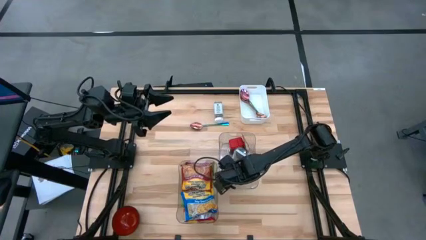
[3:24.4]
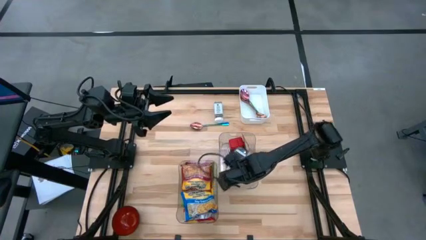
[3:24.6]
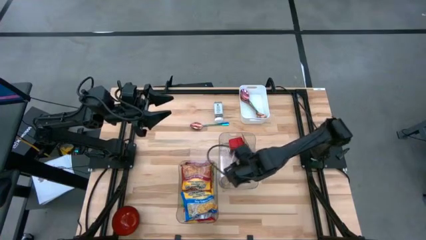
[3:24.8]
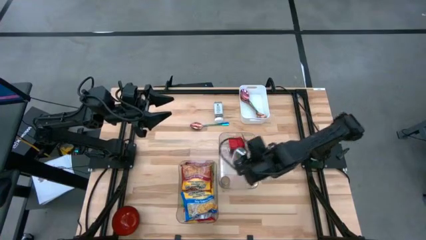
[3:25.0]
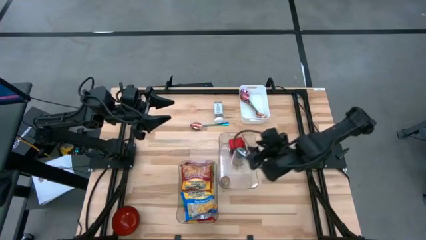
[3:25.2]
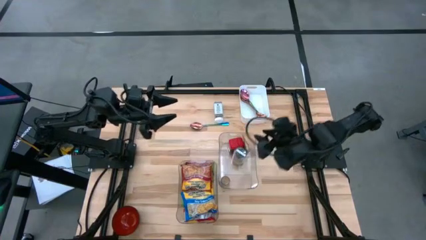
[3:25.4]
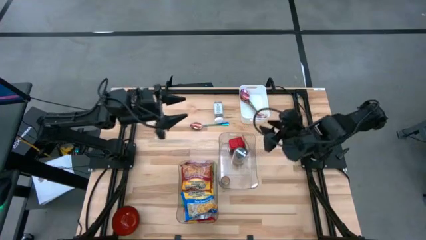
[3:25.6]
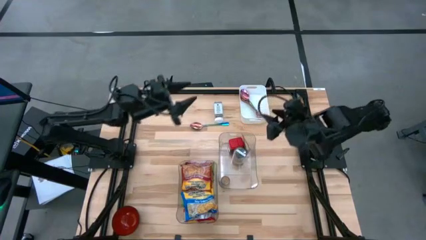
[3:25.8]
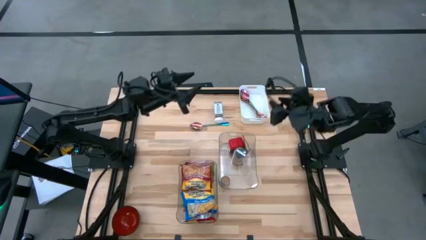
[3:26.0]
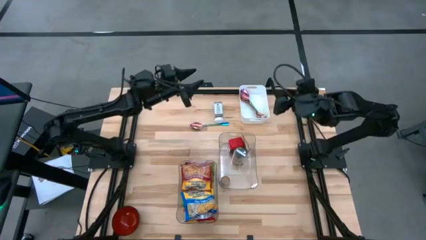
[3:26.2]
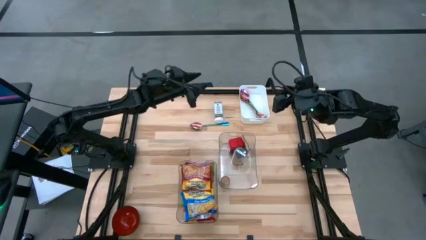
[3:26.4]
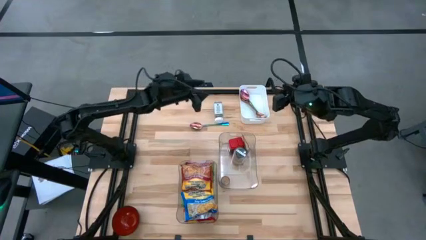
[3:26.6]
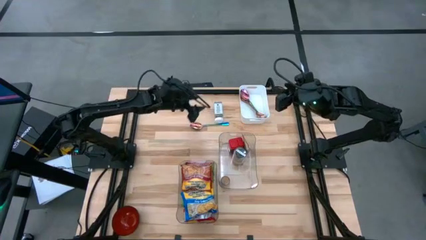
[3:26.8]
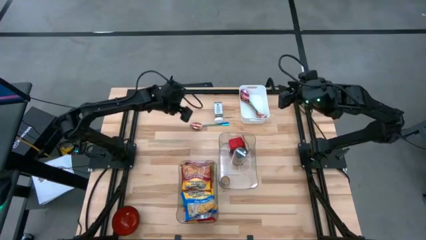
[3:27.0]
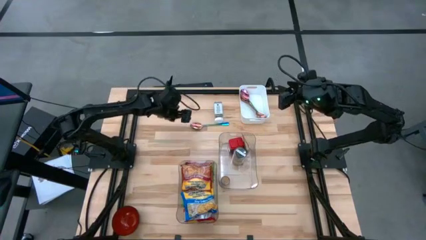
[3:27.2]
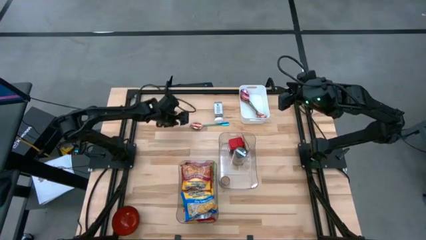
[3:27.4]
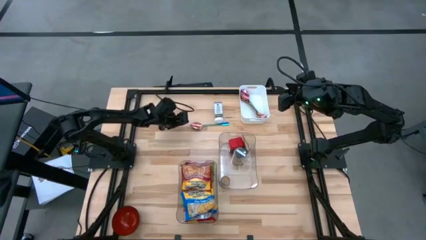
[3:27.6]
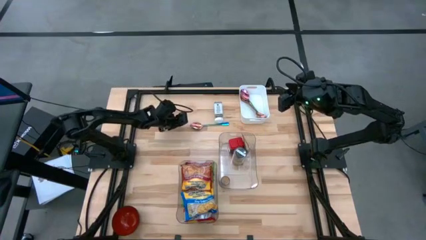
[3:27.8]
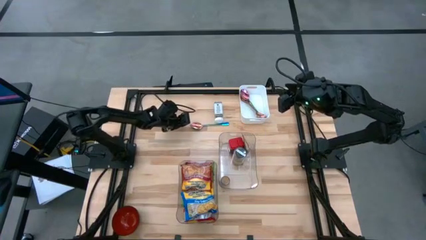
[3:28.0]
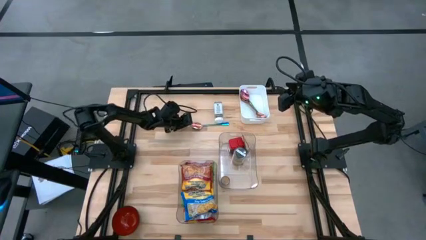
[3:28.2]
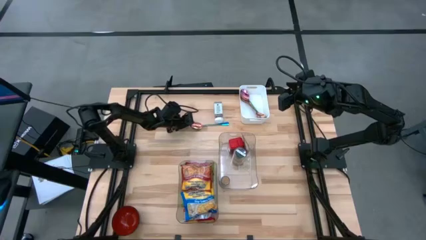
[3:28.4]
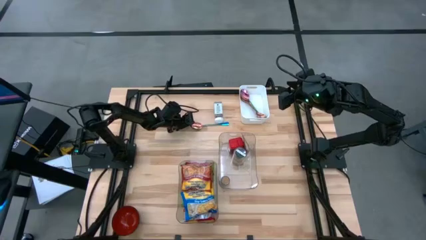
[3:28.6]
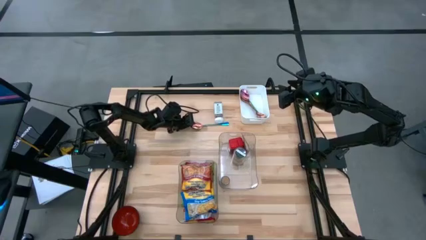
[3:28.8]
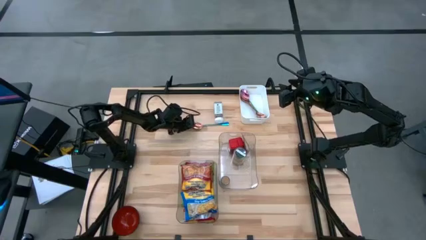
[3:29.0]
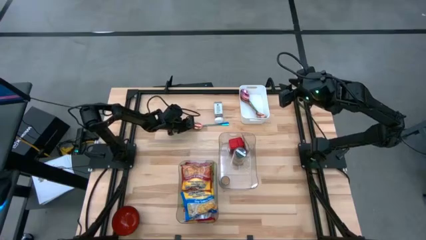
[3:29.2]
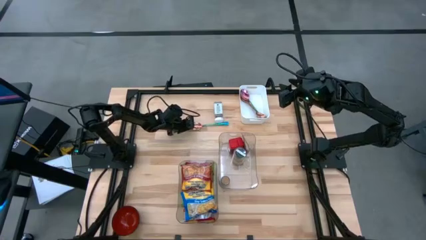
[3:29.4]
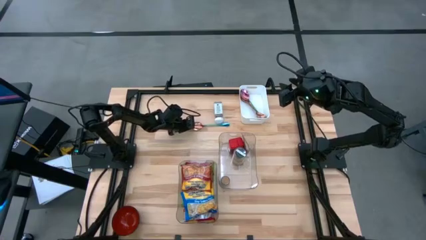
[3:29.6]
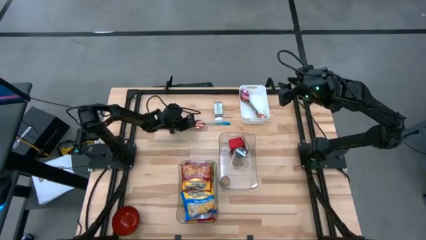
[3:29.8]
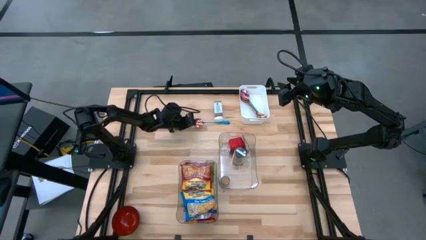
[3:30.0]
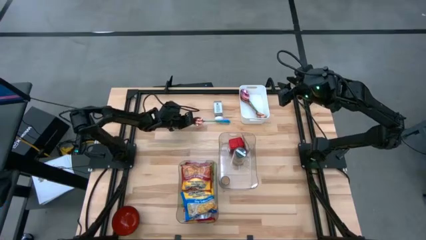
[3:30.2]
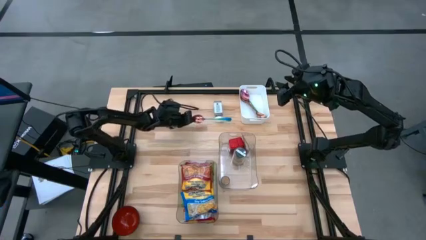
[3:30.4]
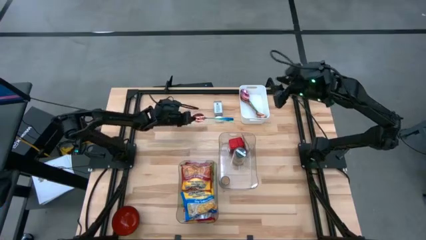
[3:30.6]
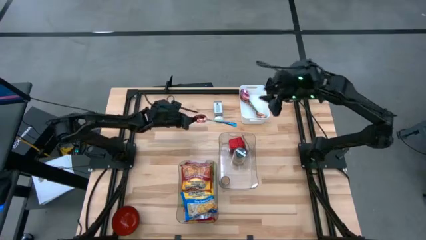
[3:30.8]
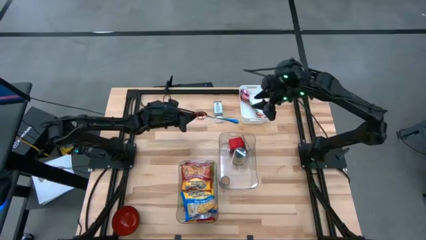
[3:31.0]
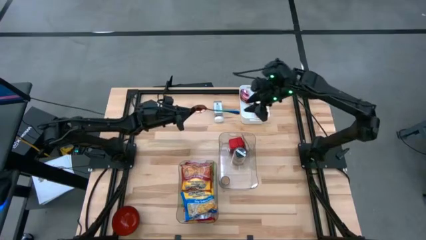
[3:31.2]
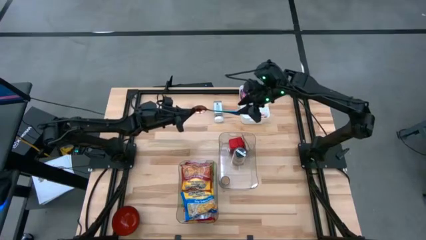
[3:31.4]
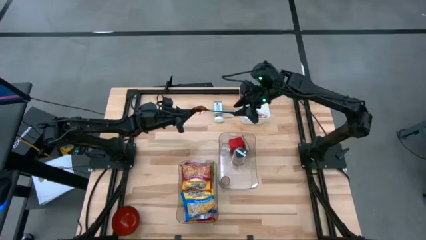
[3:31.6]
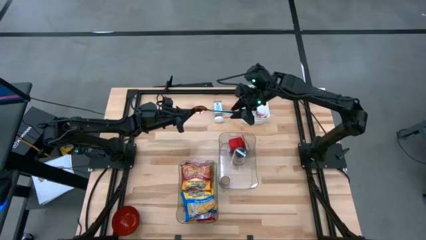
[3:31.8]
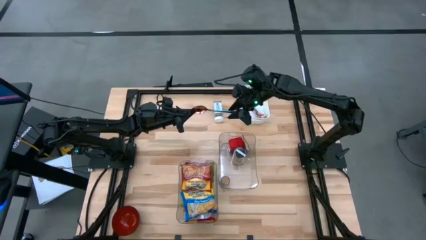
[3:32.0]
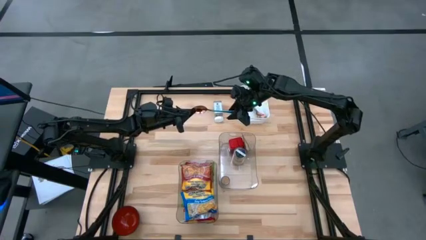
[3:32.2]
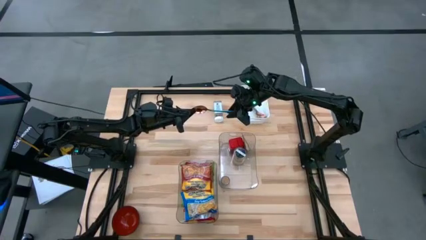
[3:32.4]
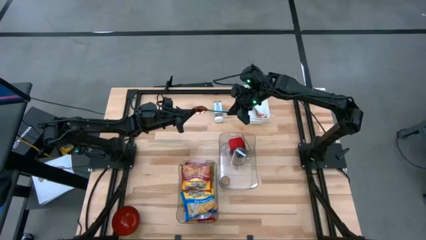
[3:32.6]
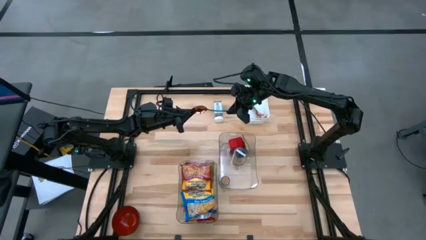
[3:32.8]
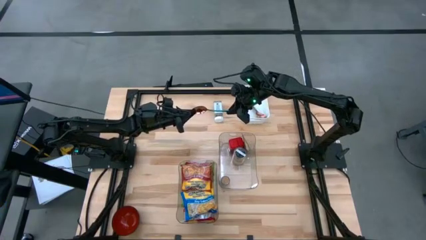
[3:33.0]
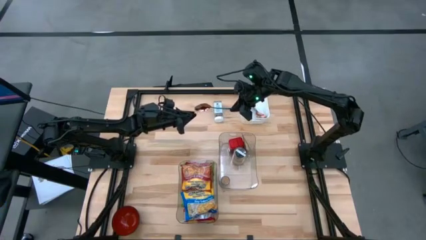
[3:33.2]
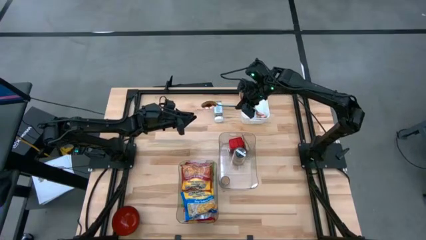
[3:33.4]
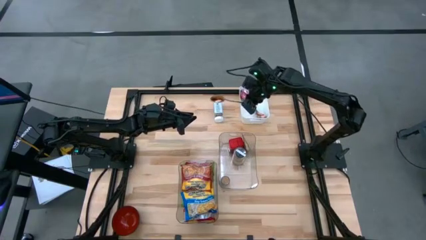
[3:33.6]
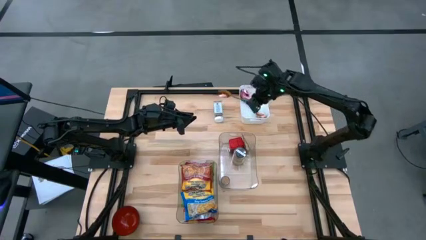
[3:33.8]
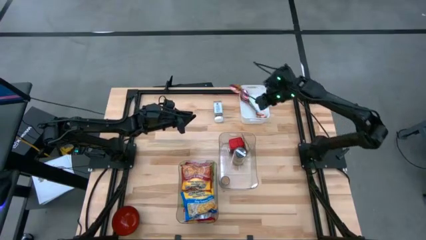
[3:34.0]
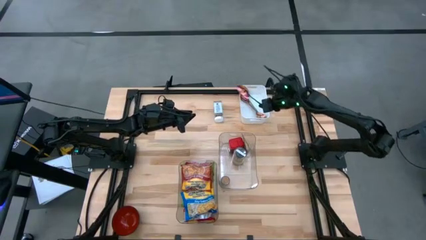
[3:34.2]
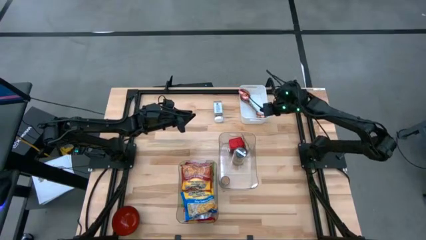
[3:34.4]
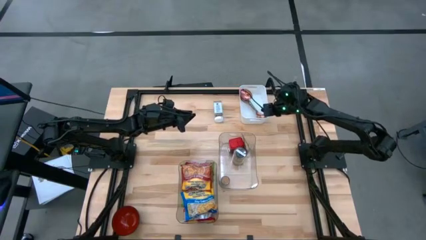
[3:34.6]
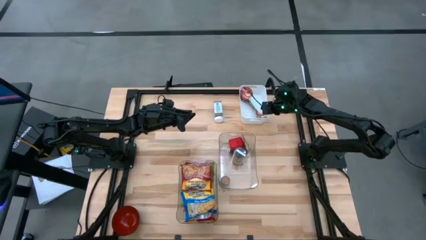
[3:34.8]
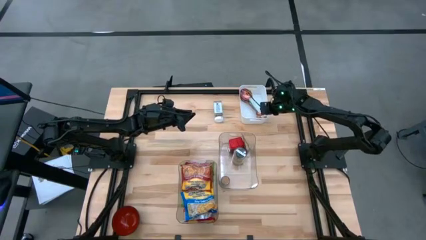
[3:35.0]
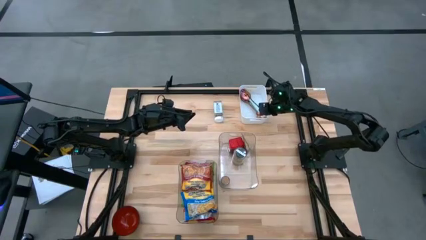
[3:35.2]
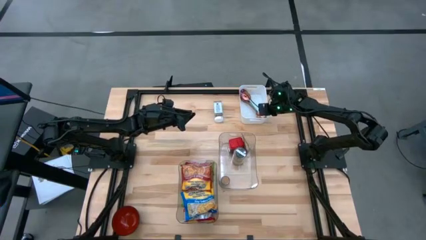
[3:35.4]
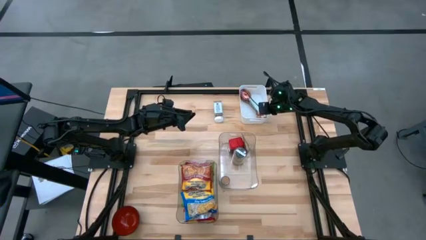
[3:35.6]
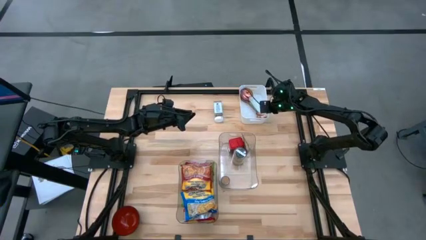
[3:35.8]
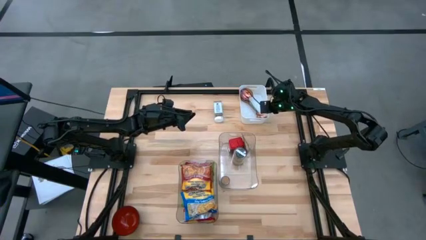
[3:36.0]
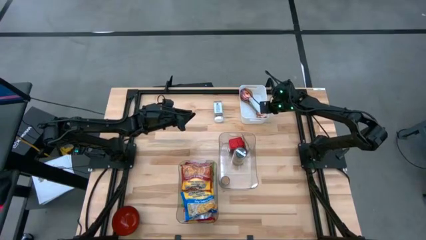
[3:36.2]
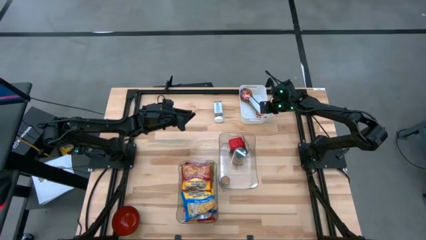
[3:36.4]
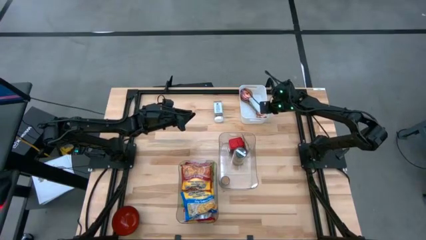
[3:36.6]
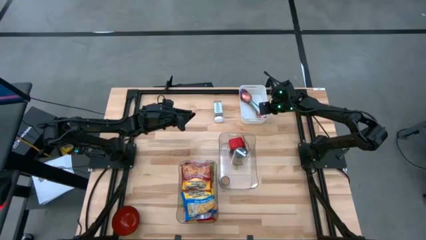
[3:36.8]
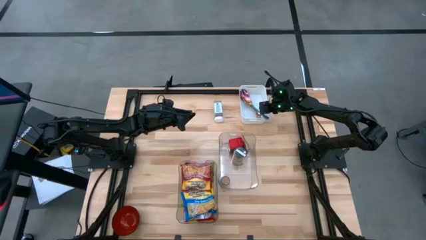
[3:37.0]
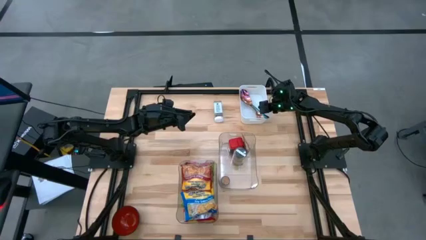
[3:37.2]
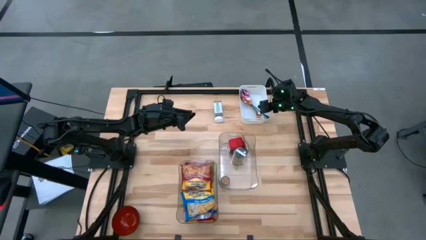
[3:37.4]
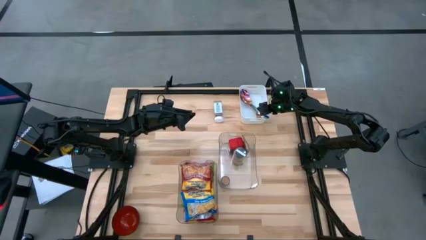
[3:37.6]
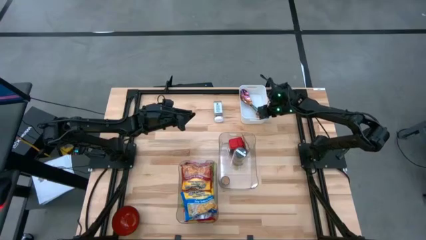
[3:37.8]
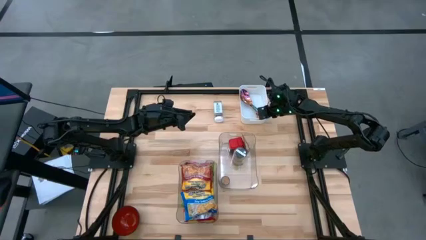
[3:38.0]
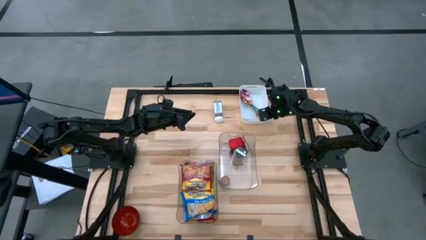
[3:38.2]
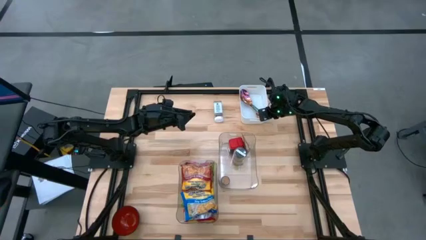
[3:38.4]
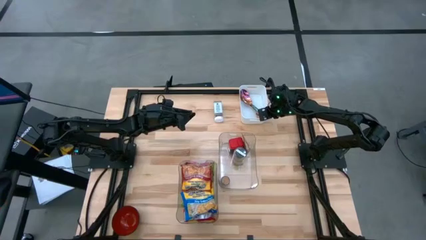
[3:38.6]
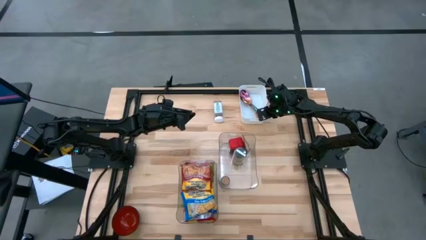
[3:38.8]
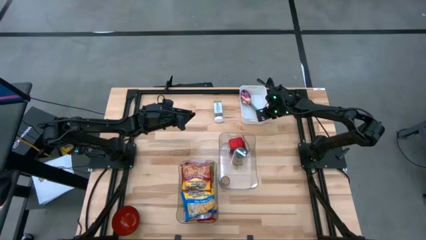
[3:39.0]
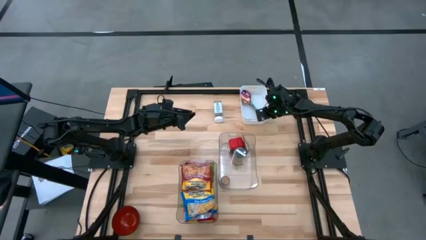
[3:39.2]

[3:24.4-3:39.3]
Task: Pick & Place Food Item
Put the blue spoon into the white bin

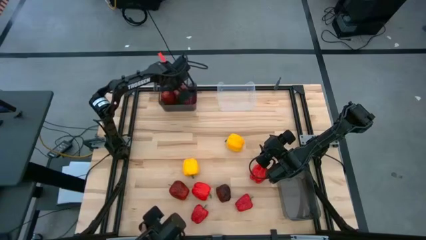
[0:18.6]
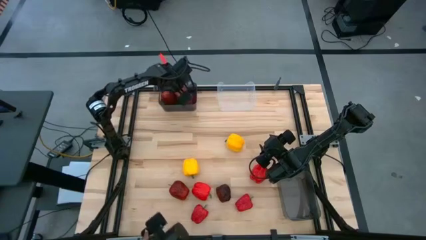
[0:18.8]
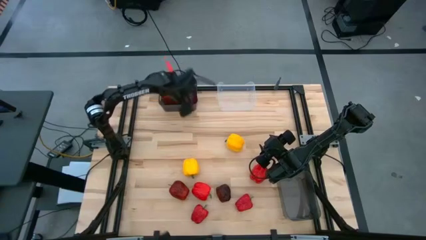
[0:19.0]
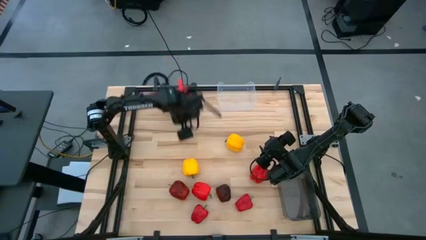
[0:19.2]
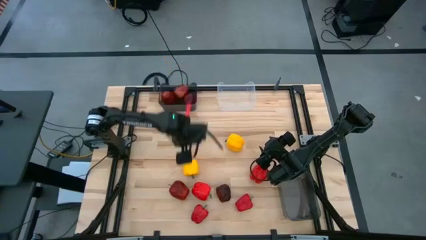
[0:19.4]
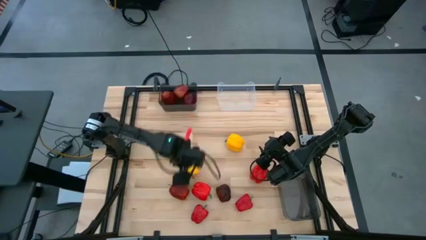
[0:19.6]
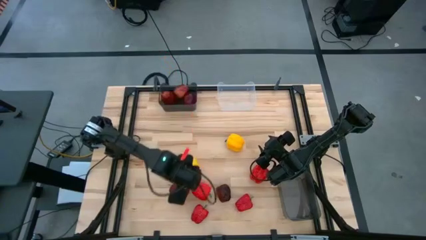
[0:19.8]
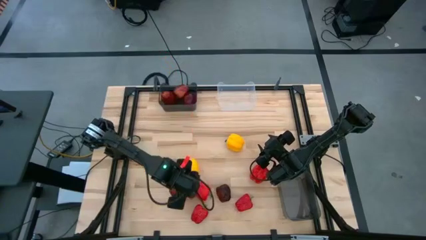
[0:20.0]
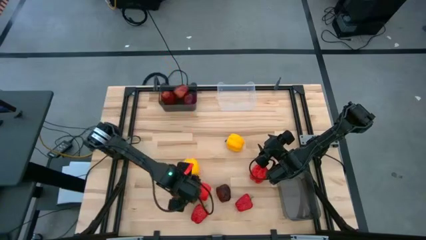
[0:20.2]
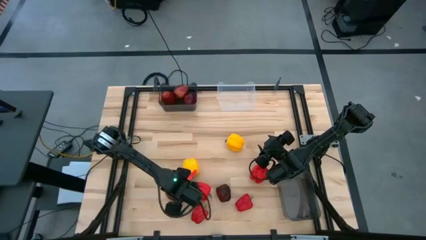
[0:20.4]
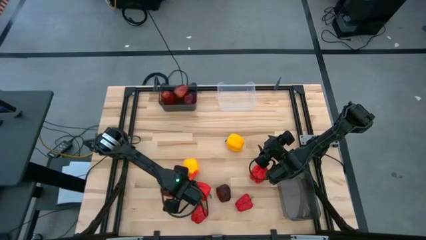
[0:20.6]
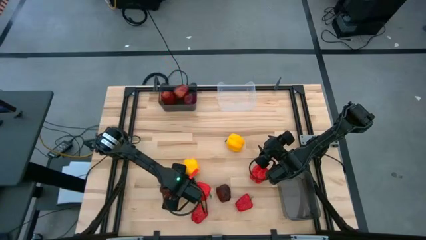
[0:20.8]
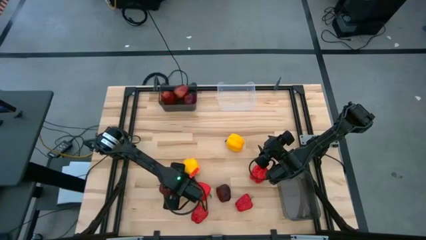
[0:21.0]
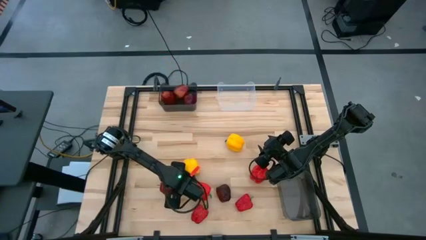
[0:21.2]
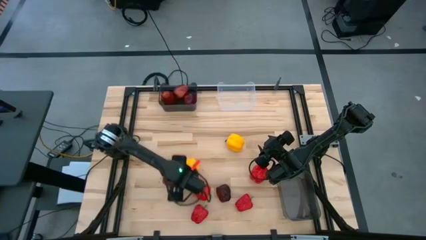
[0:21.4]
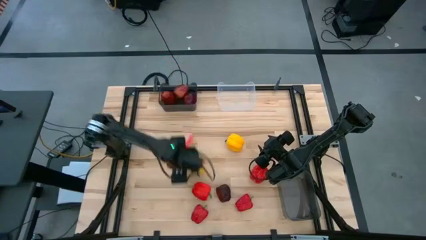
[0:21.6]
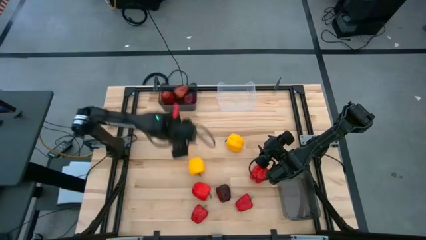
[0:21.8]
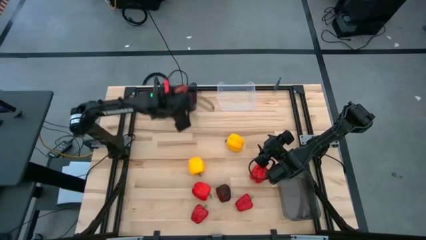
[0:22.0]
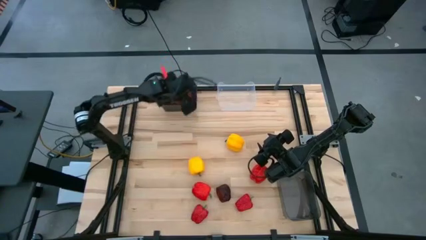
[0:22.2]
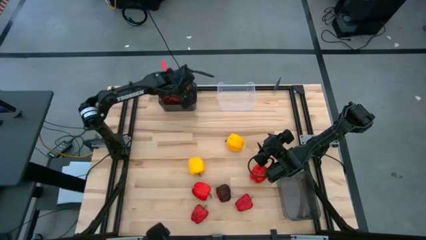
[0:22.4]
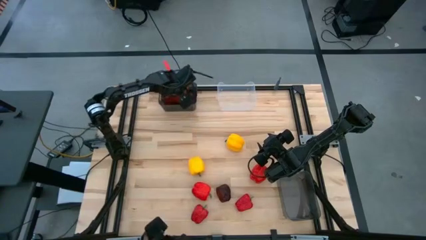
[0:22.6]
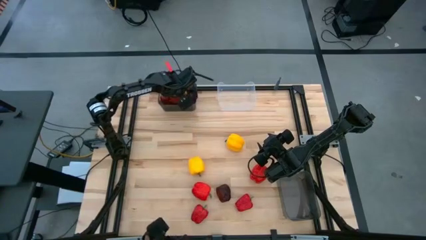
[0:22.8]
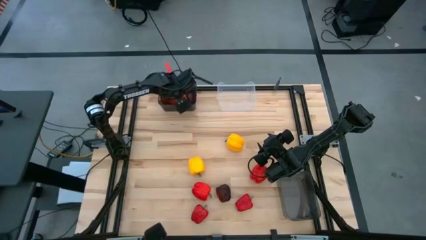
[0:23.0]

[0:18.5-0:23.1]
Task: Sort produce into baskets
Put the red apple into the top black bin
